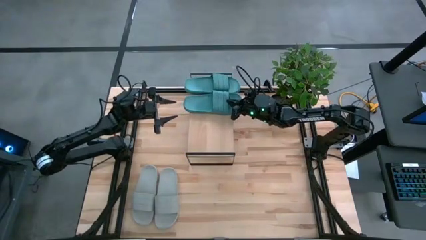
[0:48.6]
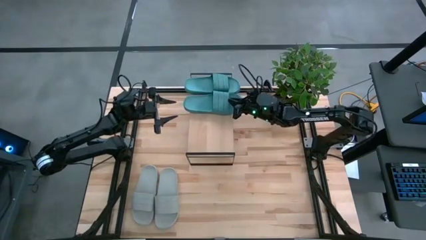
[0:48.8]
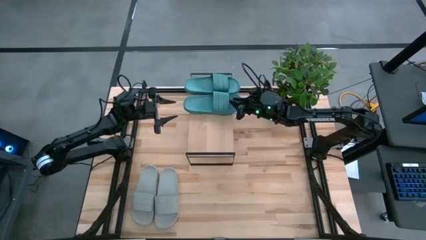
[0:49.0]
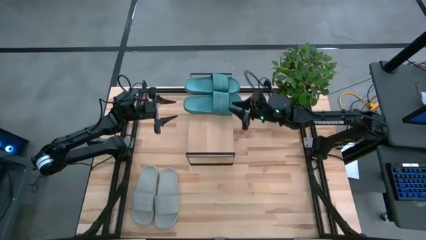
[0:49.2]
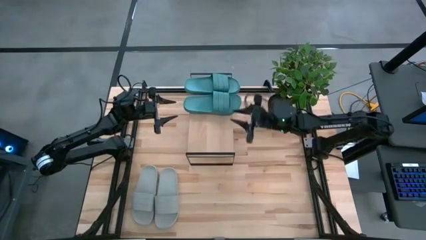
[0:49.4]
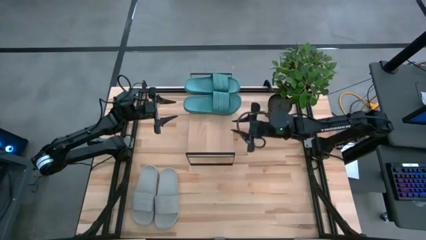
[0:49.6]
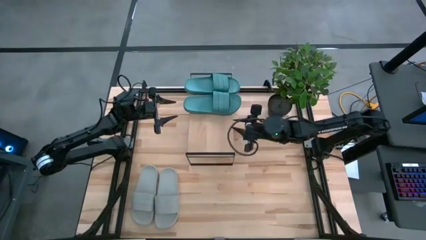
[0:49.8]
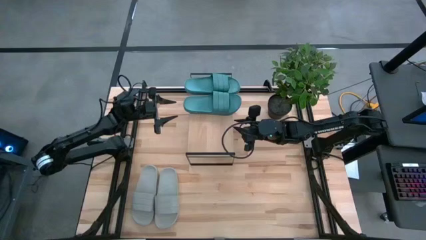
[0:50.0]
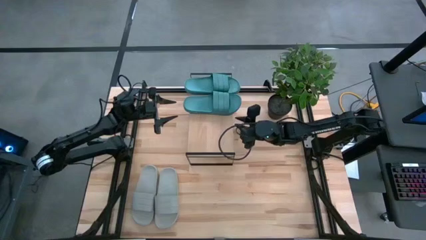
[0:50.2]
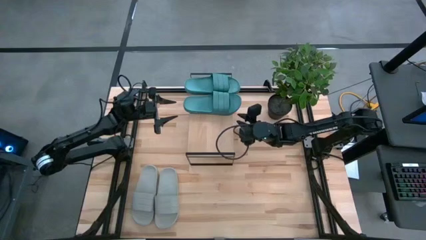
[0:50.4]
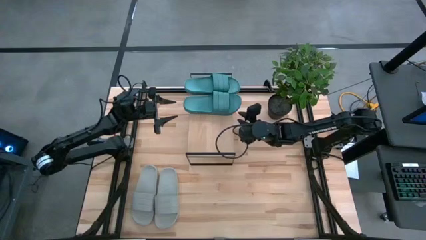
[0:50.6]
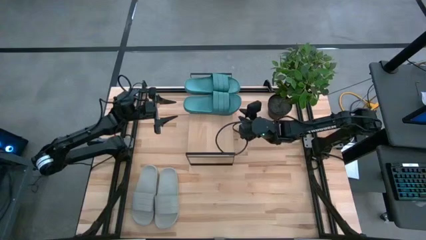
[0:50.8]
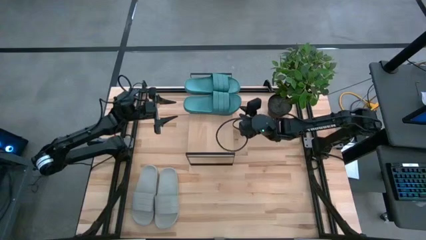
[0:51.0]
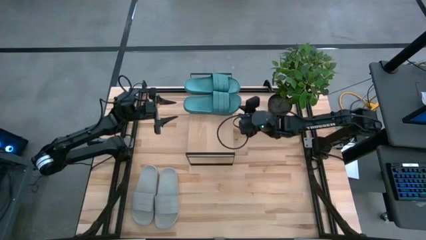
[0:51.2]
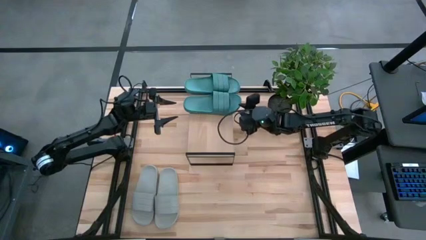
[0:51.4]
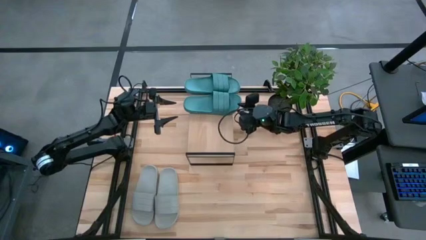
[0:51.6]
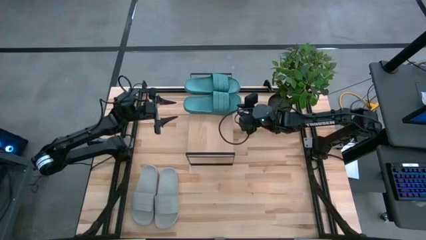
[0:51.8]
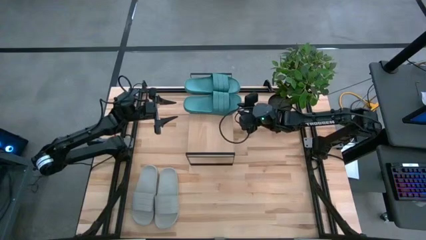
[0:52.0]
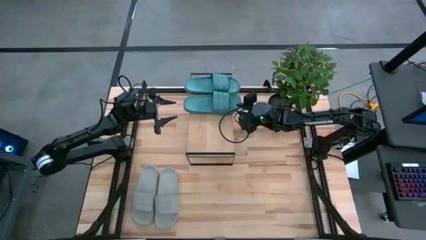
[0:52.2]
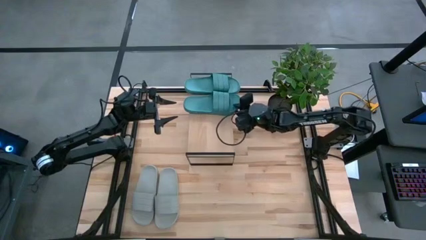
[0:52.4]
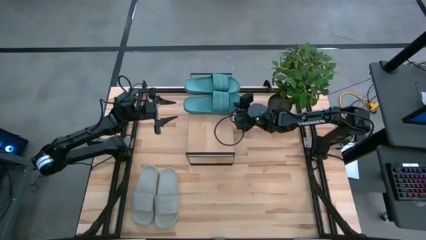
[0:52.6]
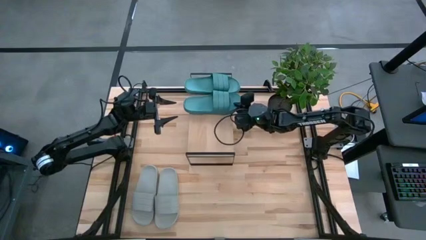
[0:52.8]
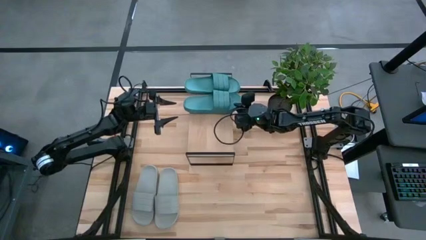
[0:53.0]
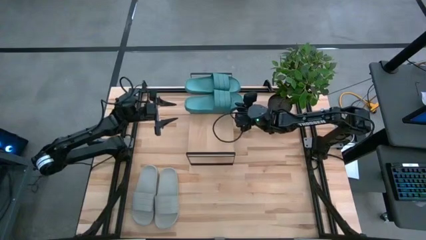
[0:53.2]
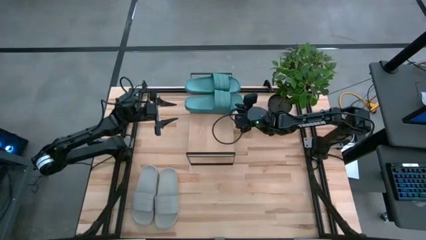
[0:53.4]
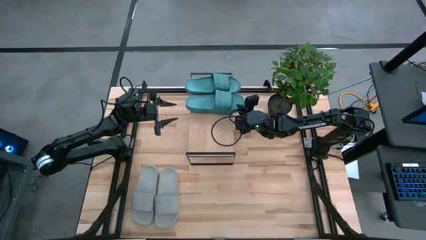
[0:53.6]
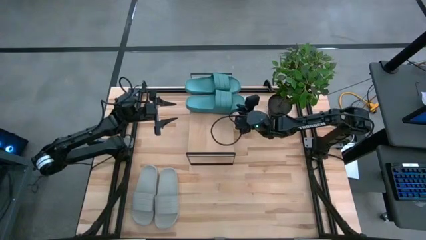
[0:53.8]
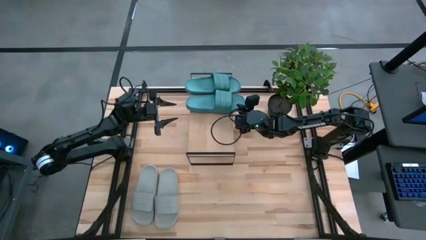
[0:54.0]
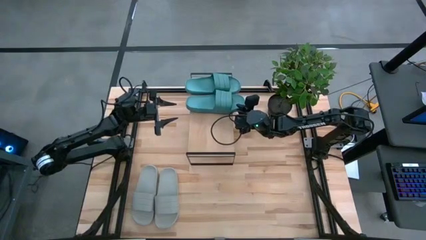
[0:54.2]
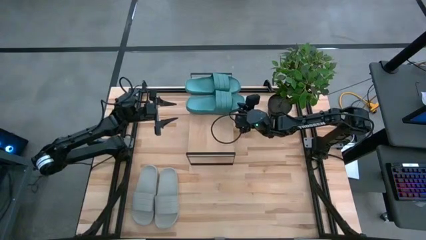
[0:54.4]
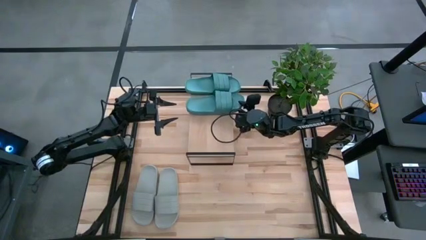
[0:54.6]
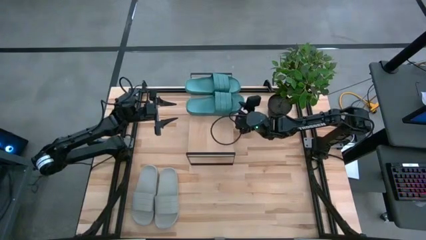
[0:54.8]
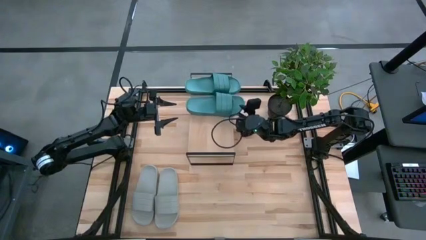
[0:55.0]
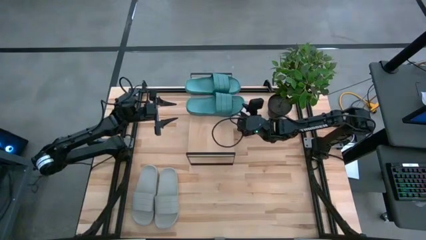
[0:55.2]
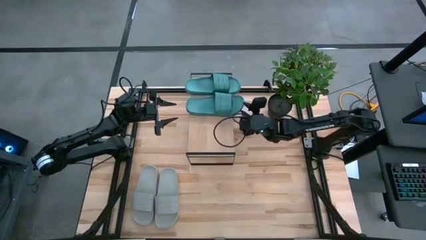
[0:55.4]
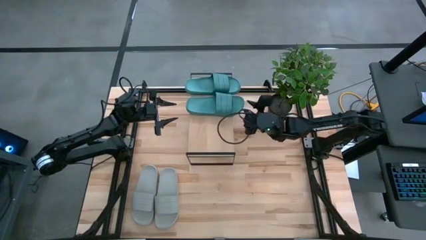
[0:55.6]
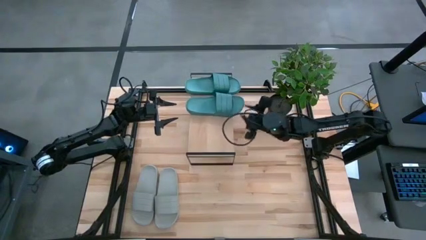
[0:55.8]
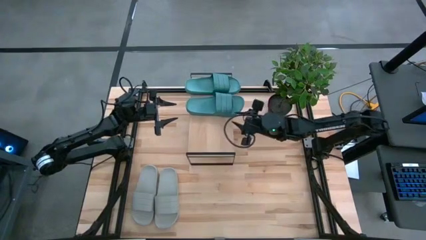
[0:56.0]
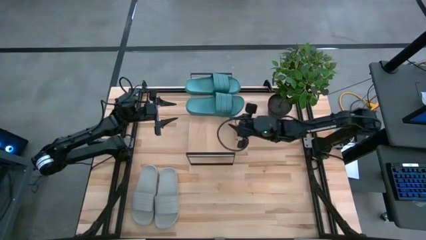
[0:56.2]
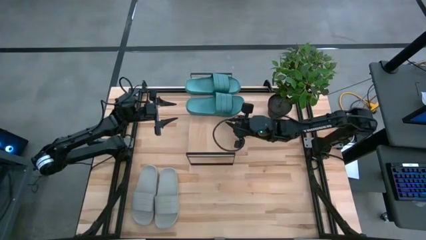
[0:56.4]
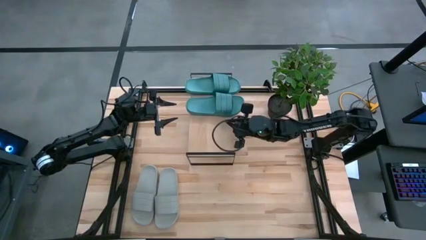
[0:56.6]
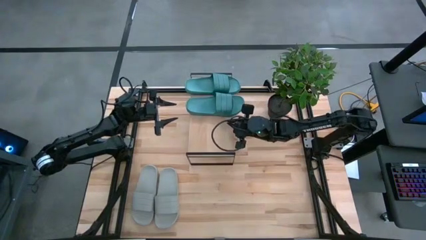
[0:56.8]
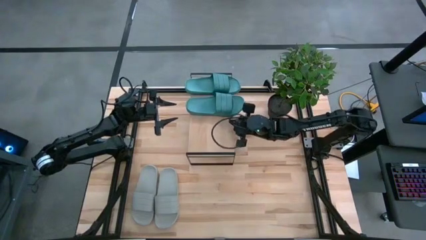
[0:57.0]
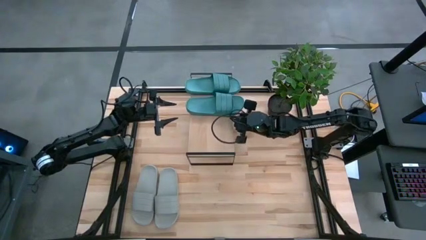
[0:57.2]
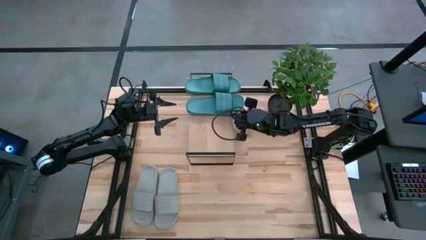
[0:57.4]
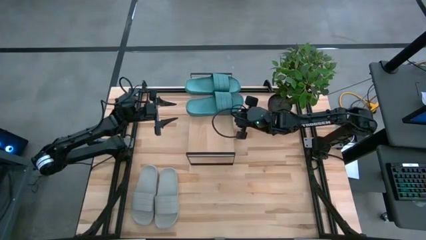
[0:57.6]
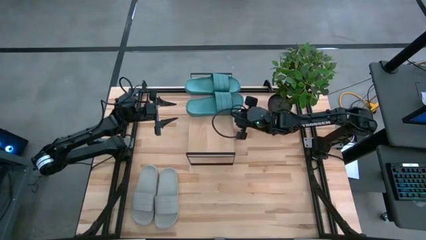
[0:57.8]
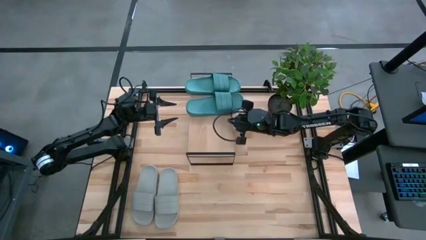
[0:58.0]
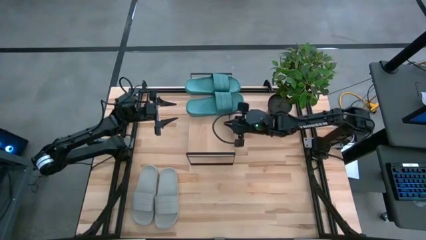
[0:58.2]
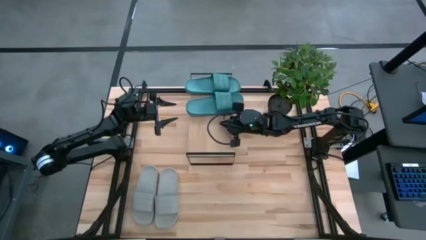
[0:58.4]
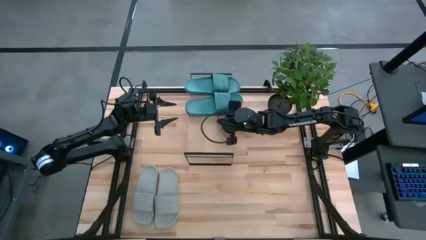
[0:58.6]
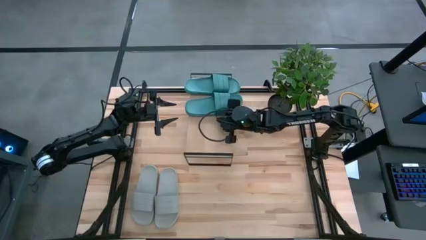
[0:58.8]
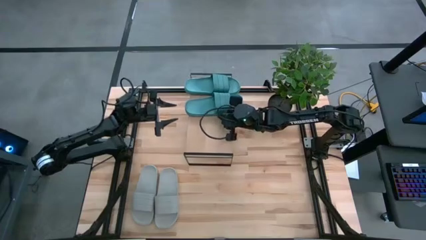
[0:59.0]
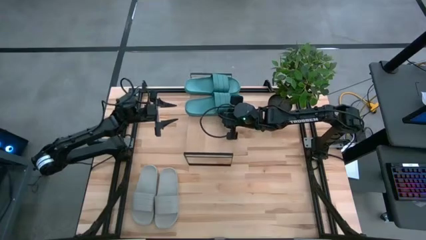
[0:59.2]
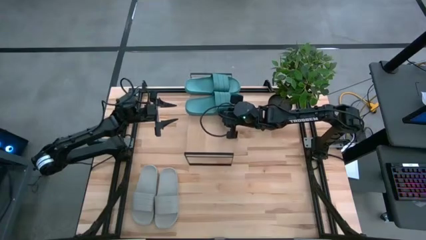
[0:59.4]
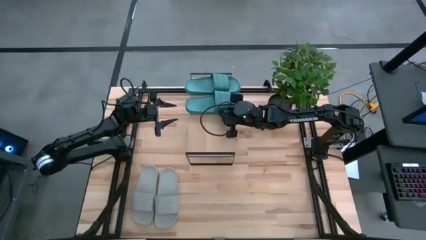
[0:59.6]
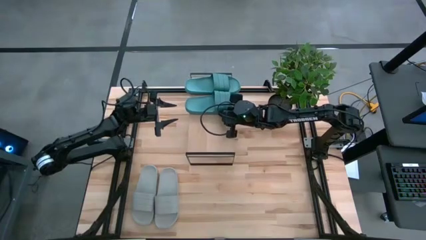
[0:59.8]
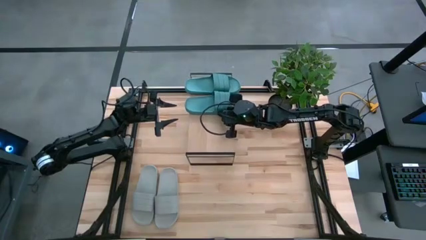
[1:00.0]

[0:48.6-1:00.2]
Task: Pick and place slides into the shelf
Put the green slide on the shelf
